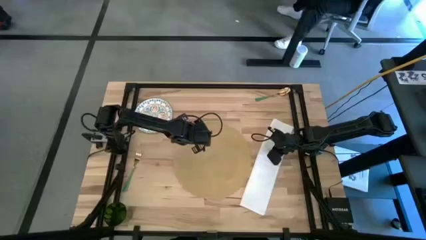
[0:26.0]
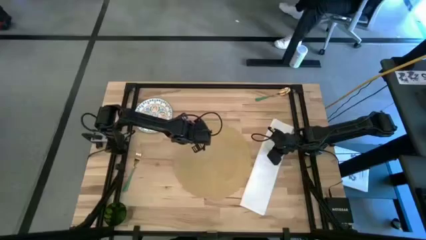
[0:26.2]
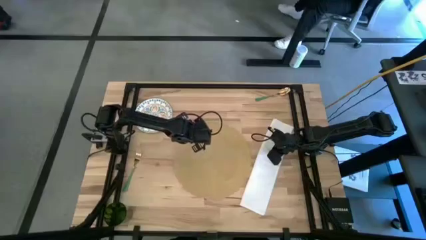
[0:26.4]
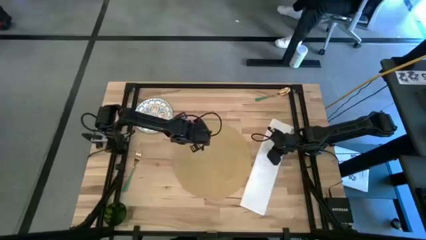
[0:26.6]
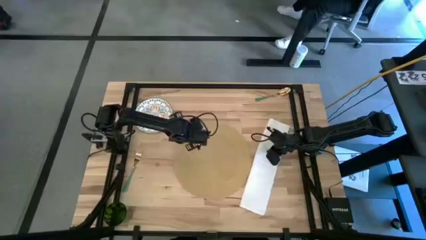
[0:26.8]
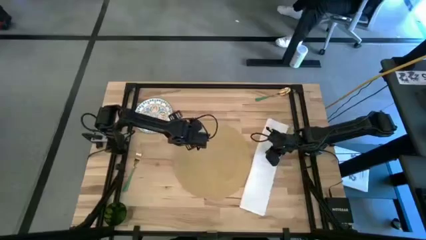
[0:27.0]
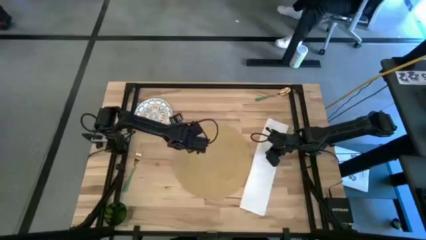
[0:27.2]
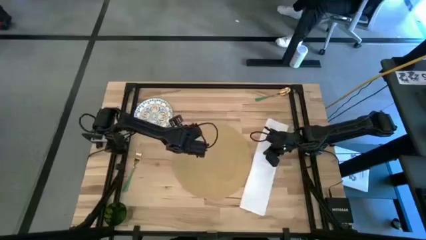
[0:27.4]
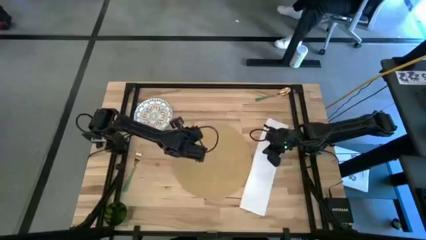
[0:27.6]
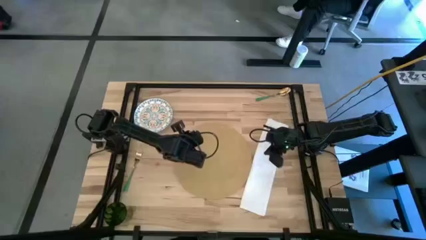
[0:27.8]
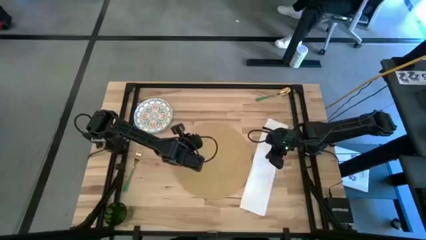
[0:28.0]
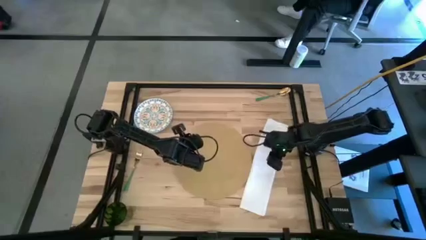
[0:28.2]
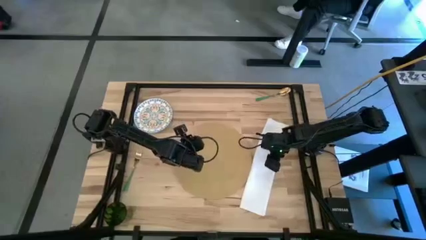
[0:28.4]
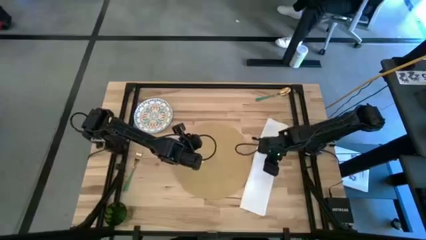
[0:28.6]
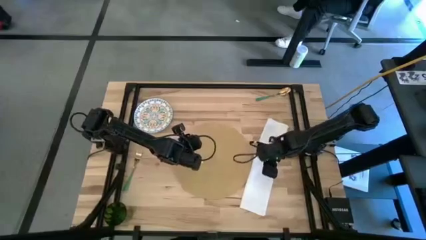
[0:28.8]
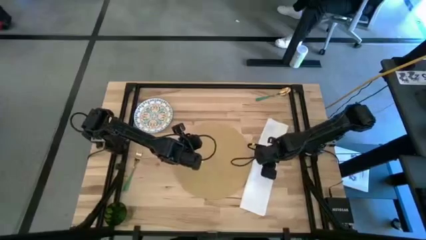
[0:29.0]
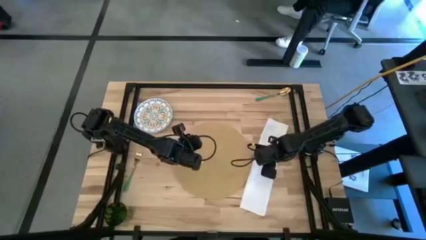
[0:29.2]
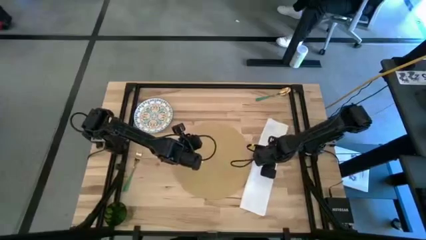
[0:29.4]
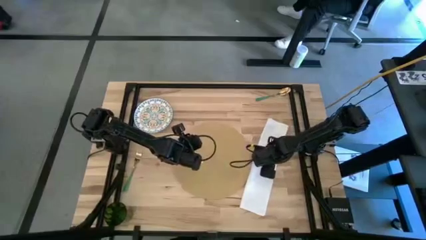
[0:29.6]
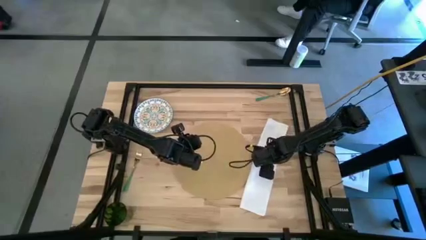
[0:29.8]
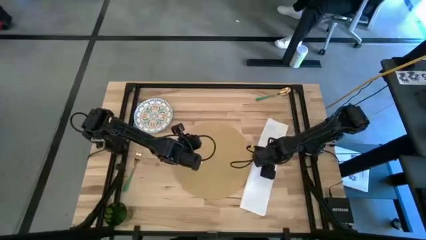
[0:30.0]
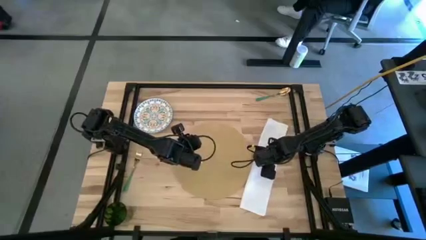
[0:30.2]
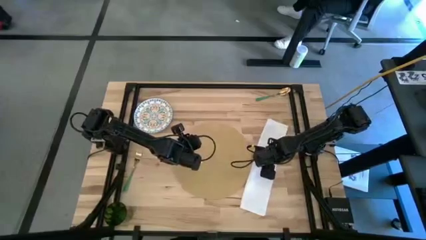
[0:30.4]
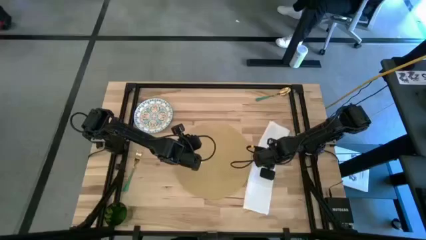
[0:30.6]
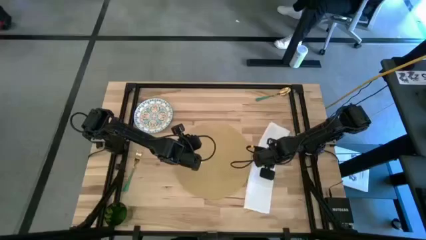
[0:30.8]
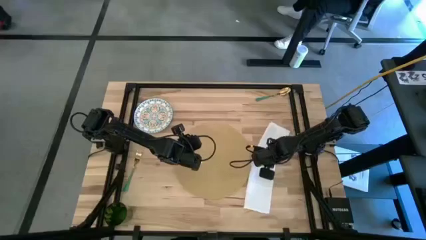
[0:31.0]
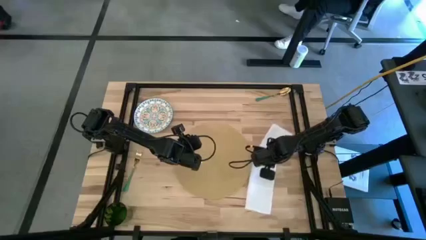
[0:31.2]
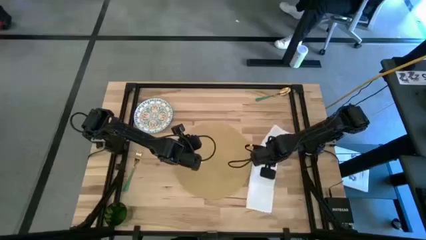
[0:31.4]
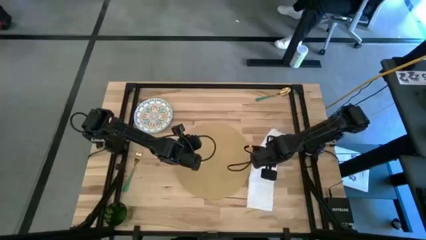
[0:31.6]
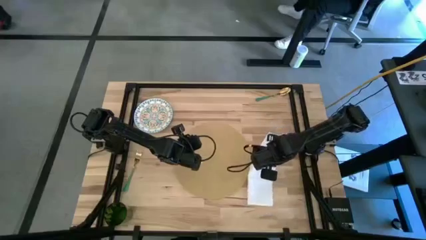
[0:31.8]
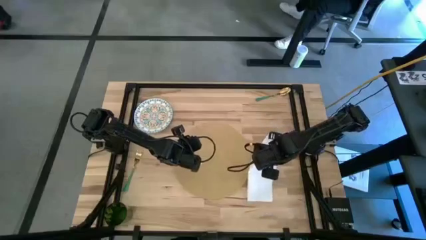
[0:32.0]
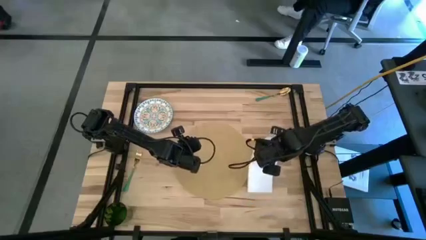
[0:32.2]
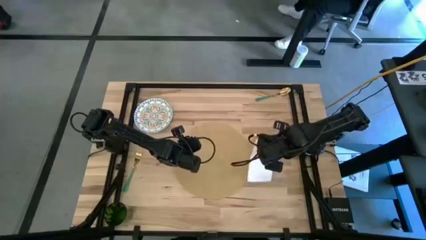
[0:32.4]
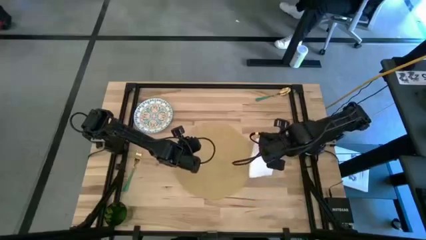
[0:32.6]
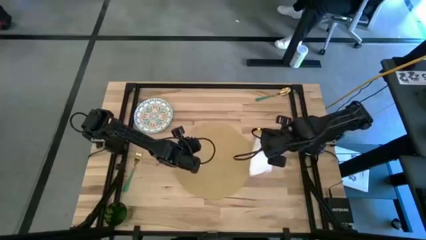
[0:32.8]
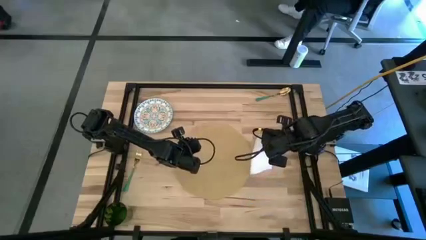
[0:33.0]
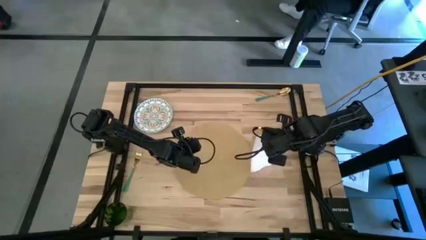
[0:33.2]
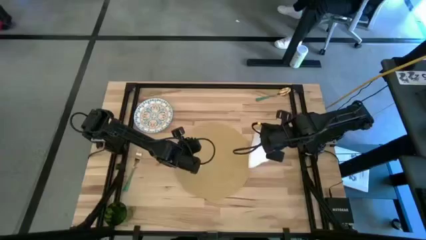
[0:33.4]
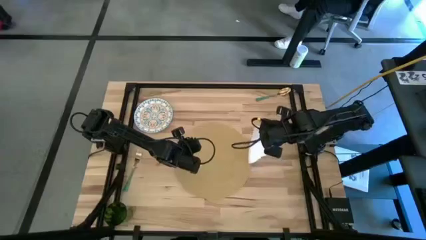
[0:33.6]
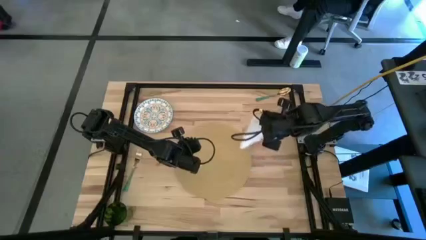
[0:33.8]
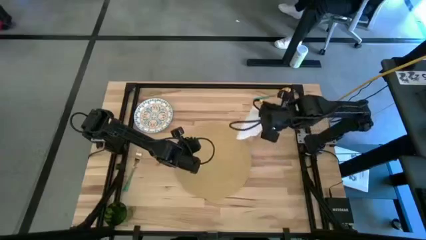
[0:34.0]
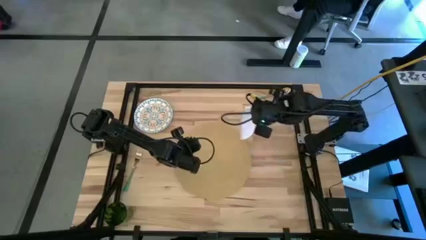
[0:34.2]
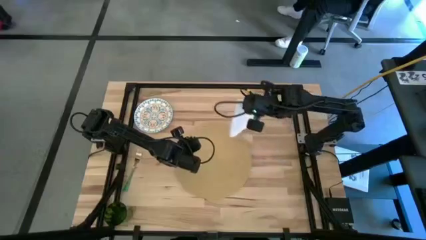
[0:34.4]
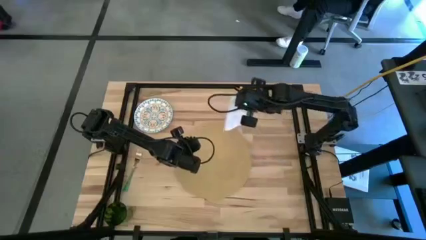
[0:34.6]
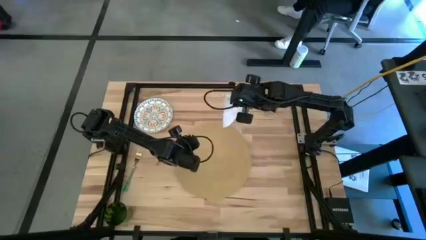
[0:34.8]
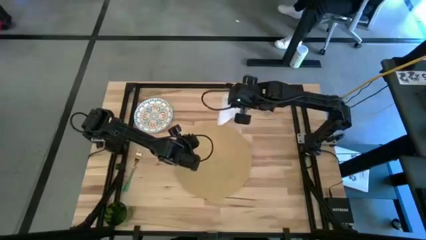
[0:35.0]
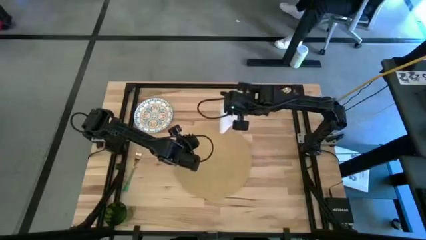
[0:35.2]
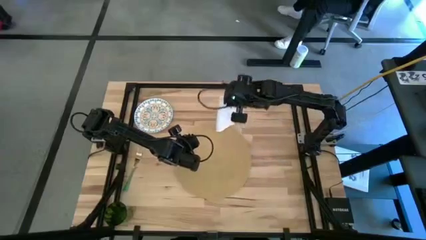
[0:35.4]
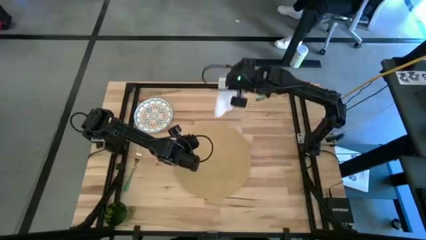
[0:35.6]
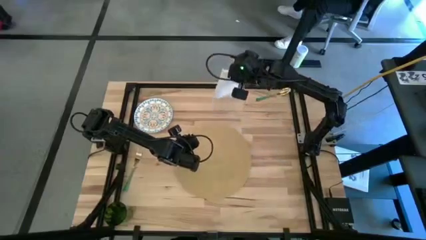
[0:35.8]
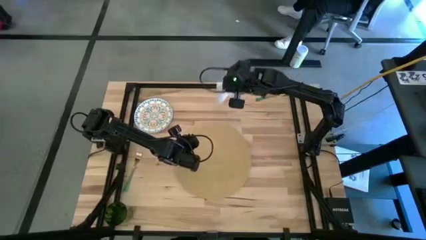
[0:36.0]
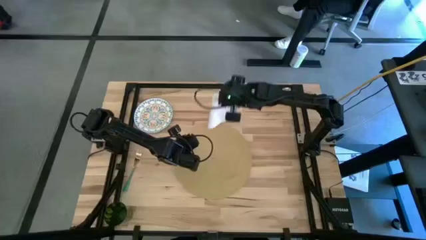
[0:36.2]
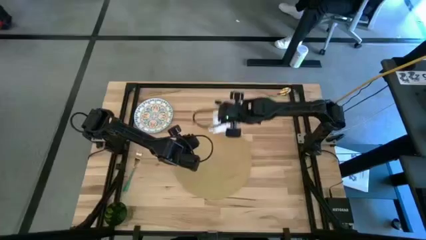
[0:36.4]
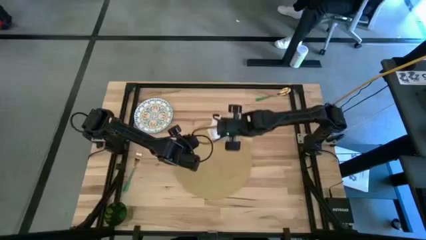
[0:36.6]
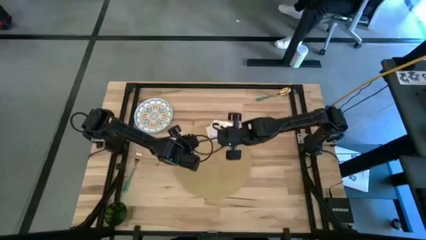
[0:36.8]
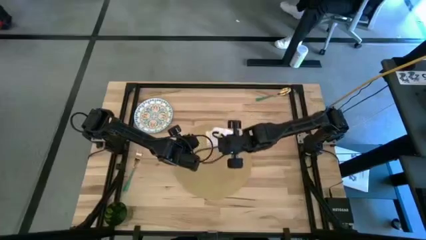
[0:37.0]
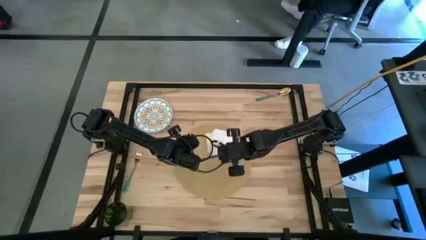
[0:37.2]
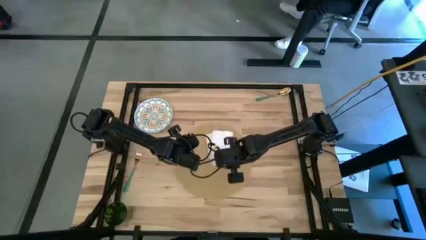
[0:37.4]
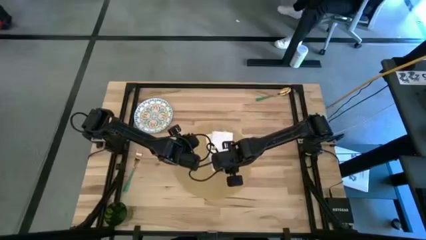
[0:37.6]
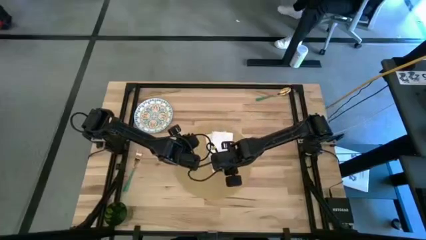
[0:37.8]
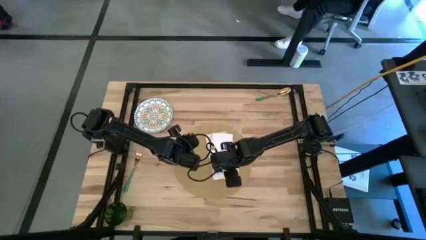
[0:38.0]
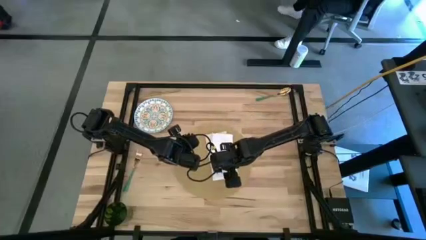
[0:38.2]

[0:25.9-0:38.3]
Task: Set table place
Fold the table napkin
